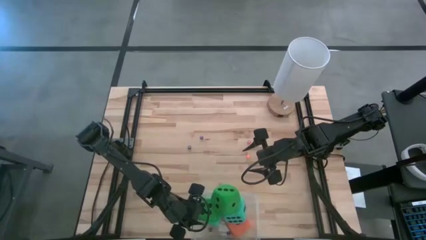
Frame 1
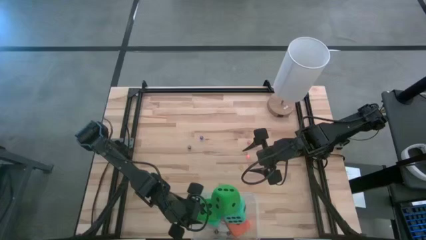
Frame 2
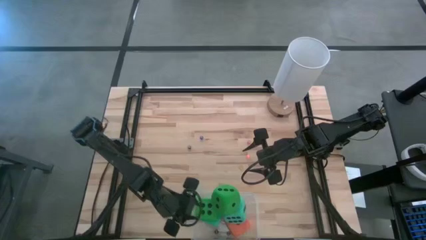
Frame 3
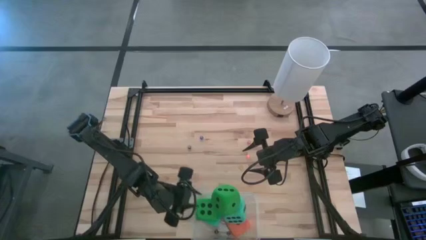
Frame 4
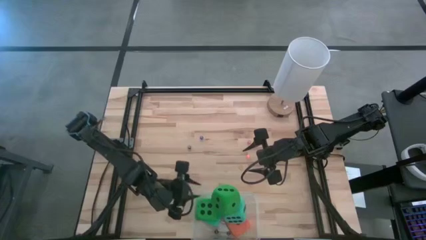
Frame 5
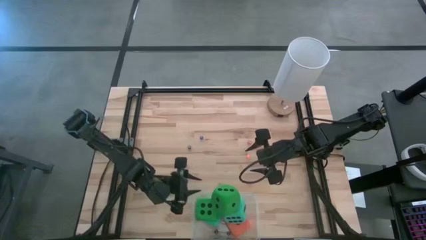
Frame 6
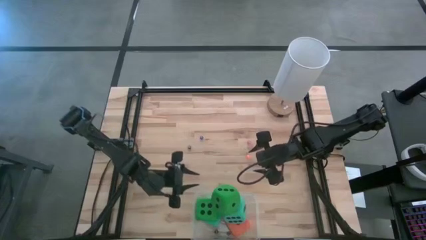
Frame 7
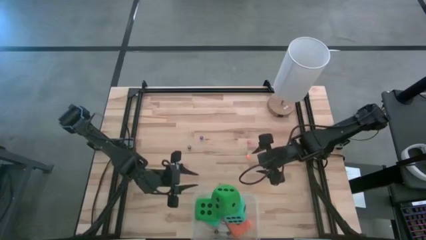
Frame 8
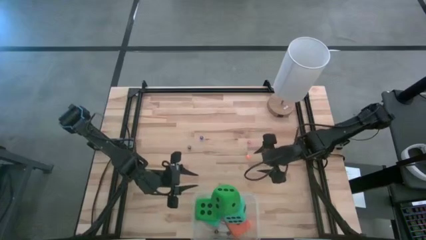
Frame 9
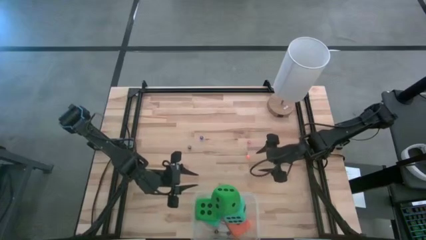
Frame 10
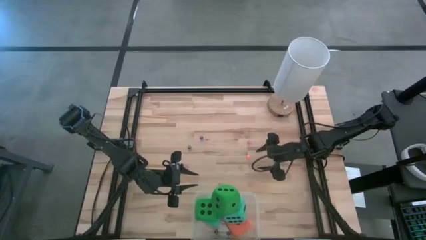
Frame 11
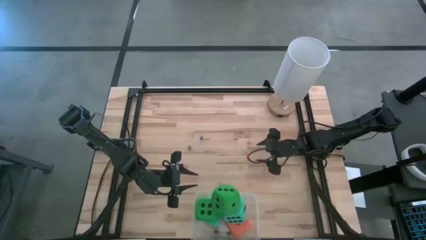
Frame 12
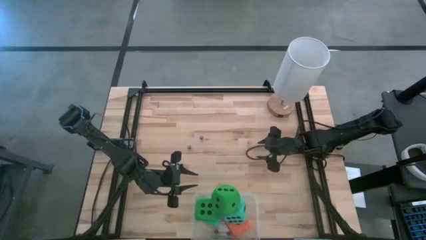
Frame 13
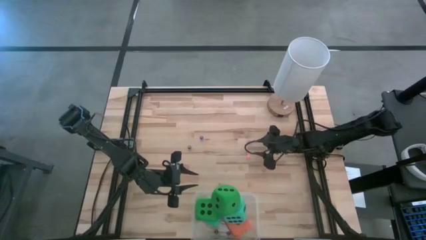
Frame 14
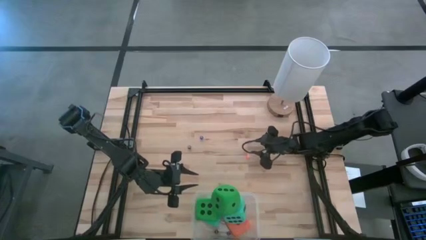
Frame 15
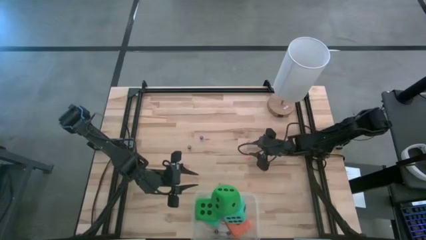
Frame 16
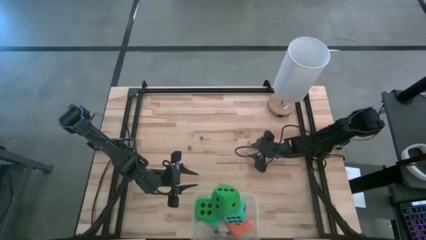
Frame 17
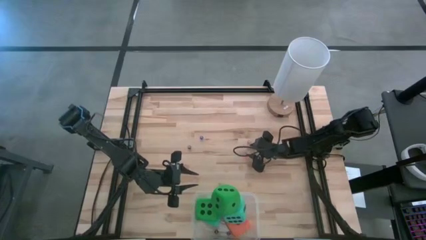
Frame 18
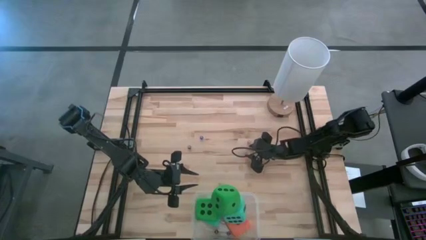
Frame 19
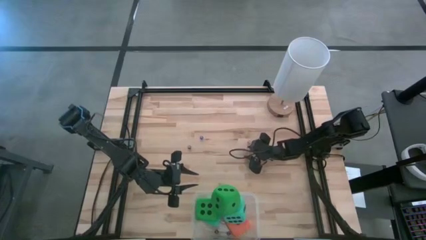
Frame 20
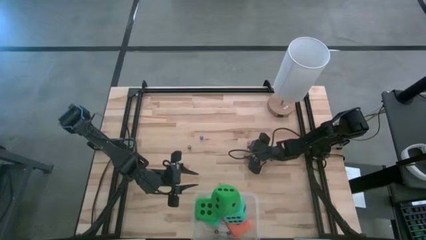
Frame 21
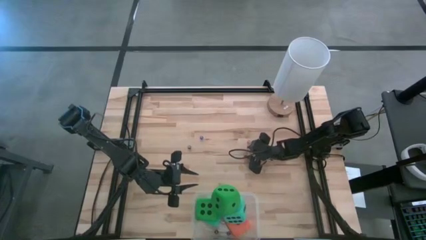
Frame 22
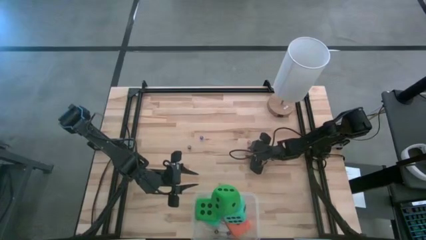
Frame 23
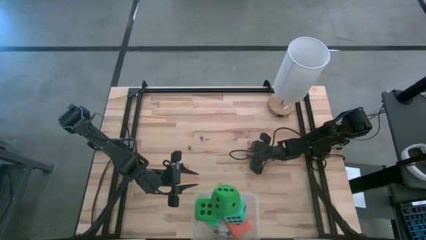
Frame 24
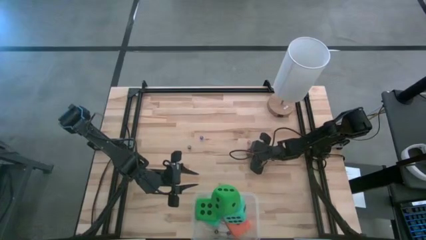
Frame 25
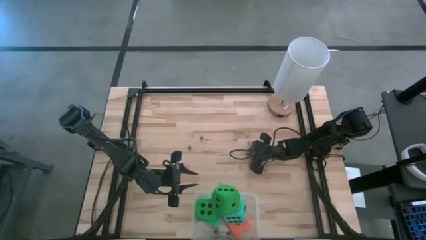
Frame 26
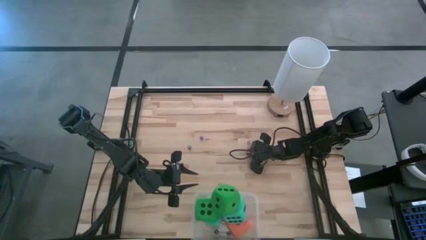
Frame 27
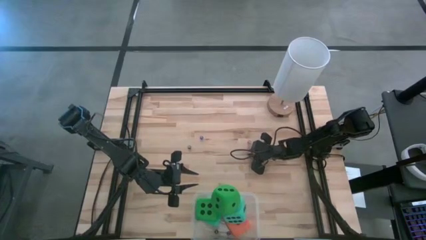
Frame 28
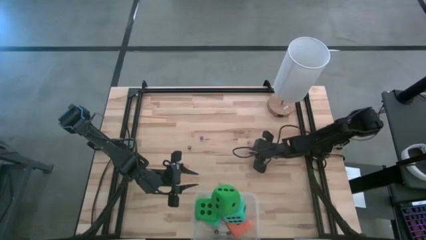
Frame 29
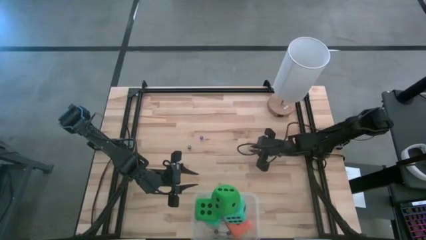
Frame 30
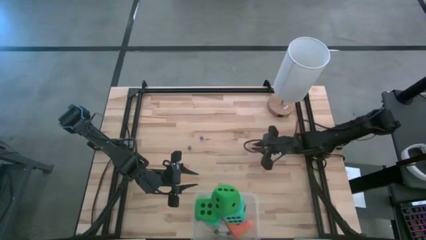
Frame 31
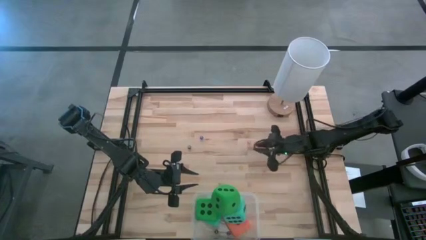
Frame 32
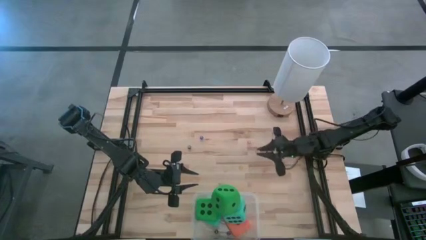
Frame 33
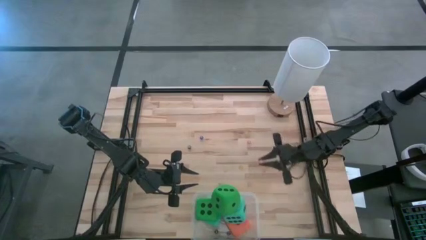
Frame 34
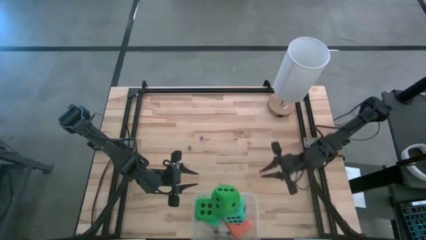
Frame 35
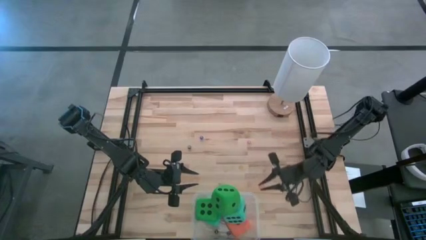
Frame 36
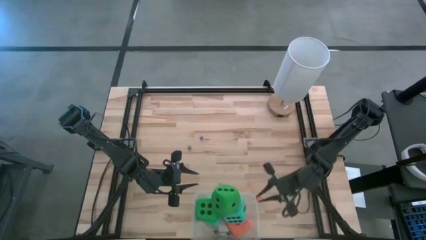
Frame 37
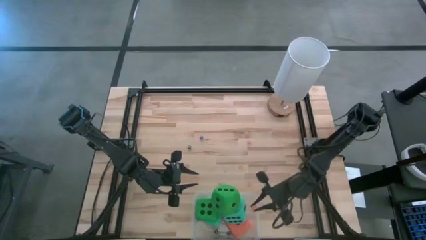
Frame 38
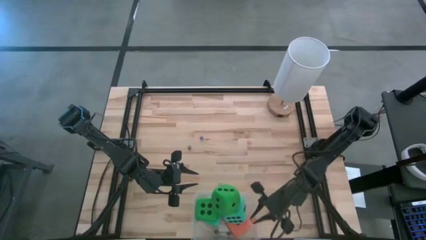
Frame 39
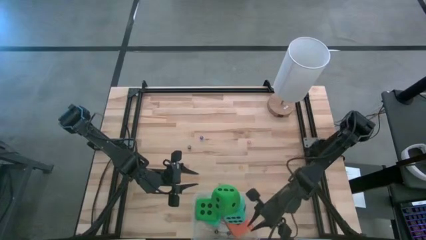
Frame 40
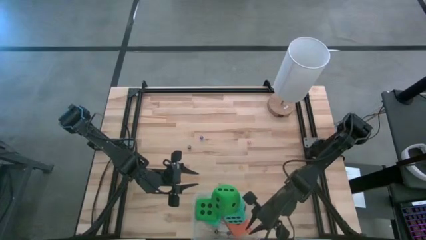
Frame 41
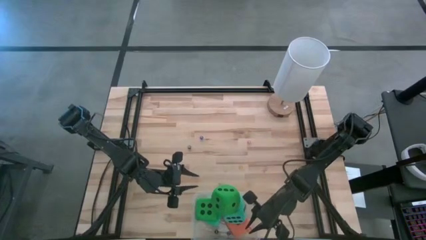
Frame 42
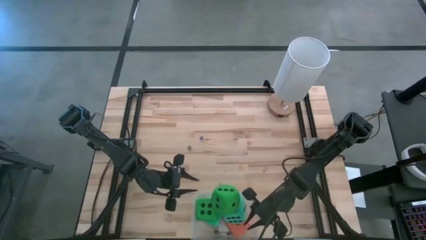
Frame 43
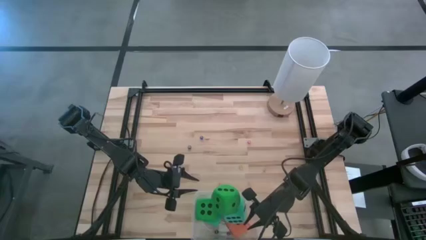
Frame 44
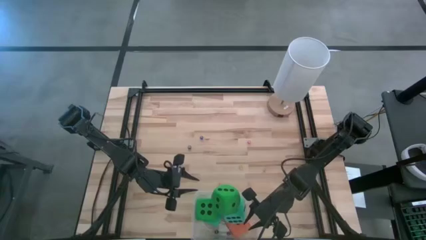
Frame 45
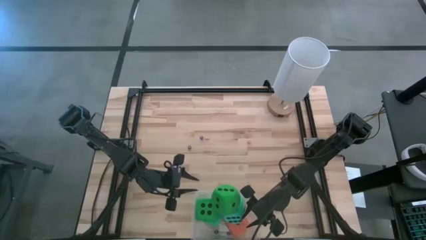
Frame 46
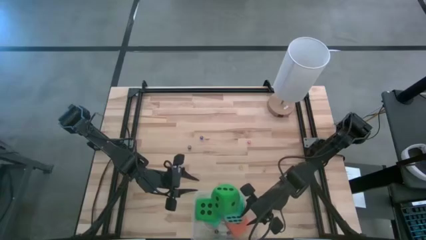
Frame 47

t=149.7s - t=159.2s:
Task: Pick & Place Dice
Put the small orange dice into the transparent bin

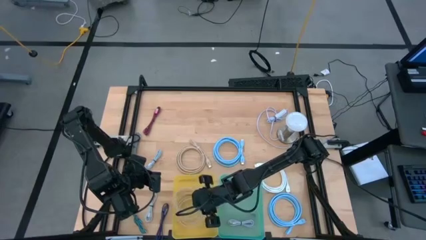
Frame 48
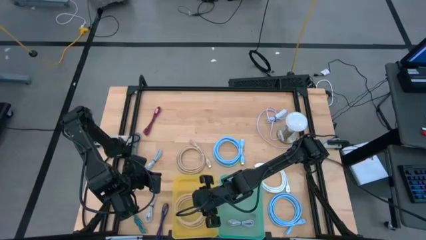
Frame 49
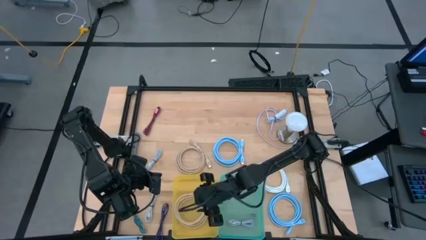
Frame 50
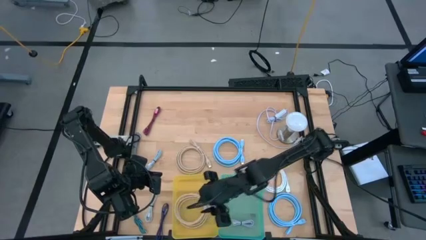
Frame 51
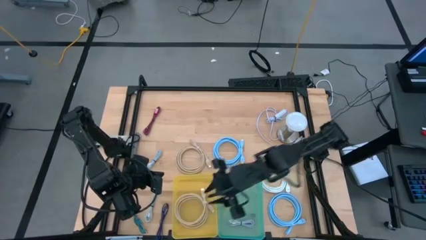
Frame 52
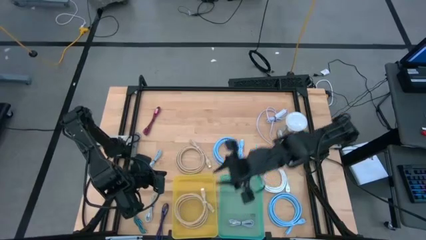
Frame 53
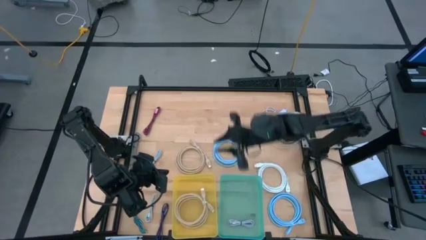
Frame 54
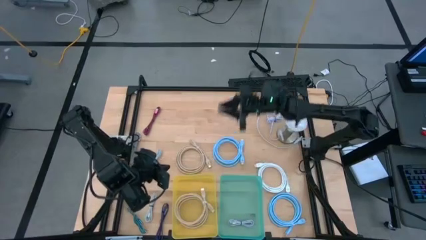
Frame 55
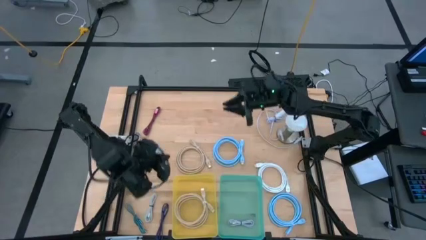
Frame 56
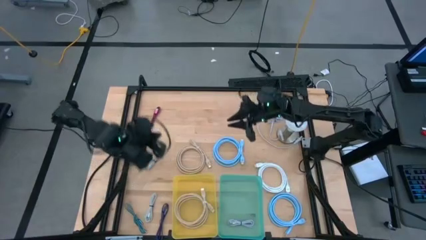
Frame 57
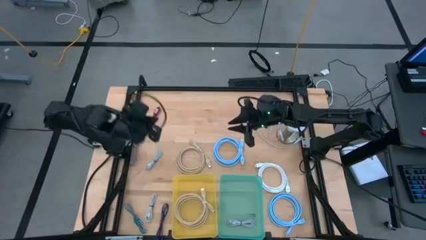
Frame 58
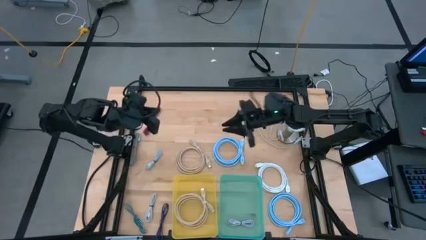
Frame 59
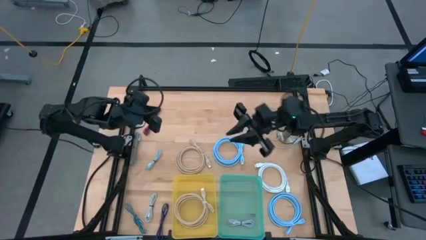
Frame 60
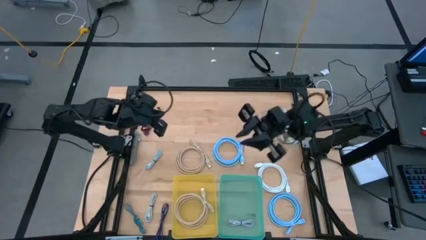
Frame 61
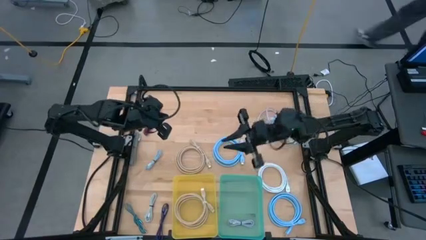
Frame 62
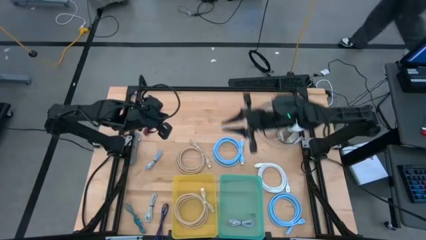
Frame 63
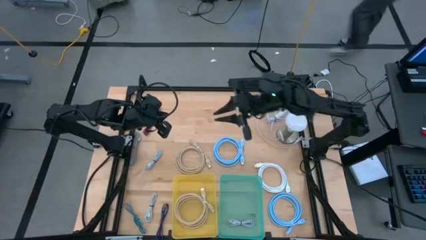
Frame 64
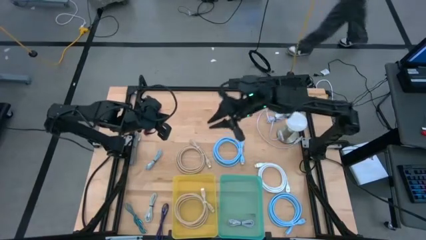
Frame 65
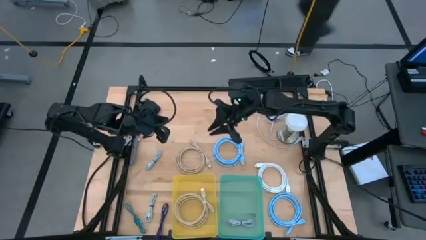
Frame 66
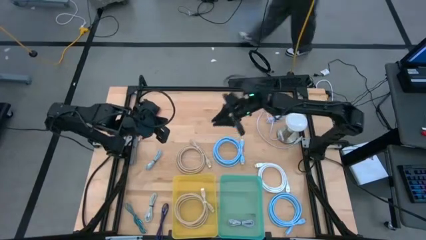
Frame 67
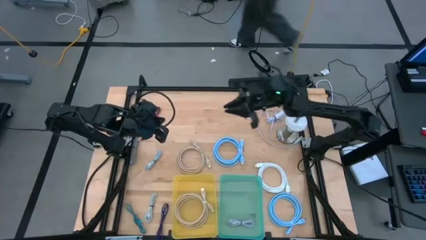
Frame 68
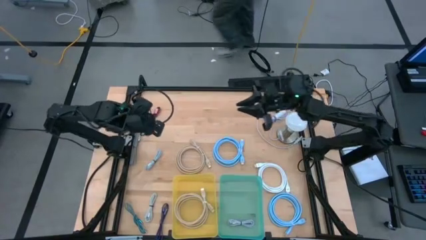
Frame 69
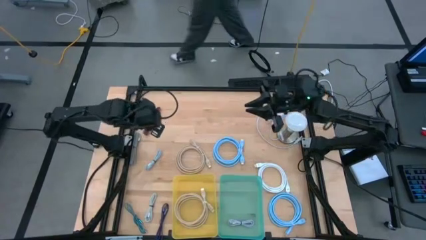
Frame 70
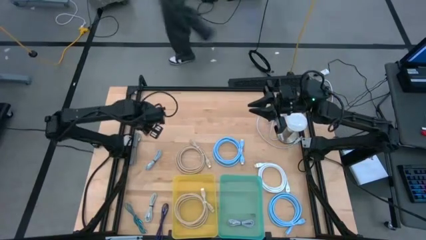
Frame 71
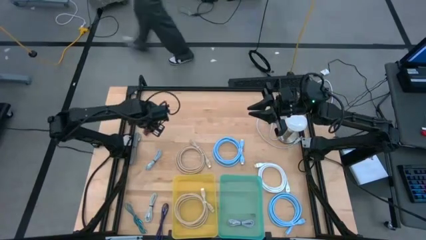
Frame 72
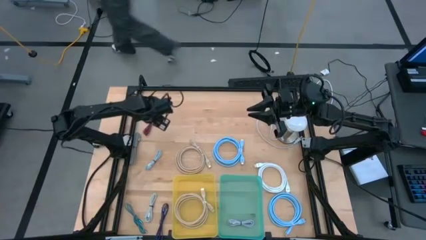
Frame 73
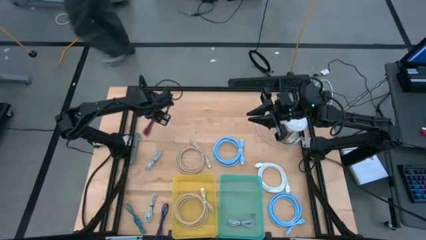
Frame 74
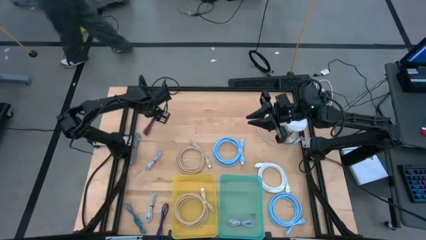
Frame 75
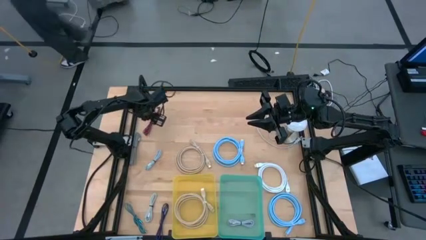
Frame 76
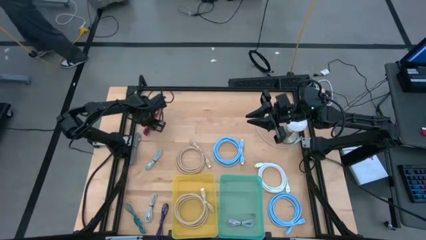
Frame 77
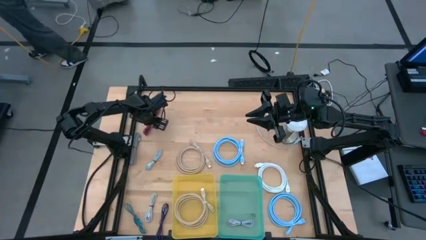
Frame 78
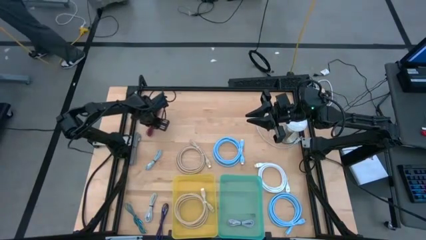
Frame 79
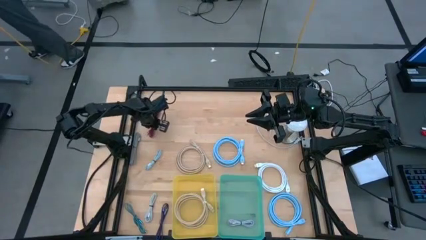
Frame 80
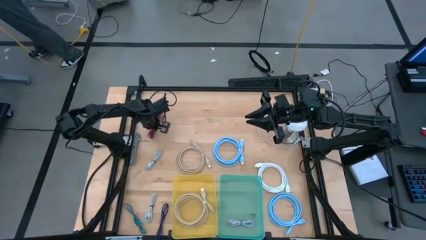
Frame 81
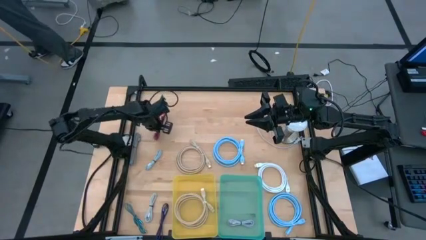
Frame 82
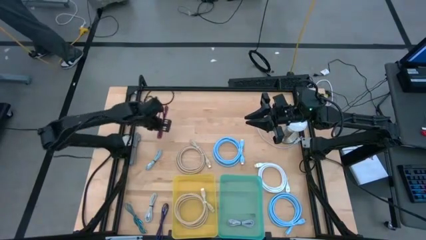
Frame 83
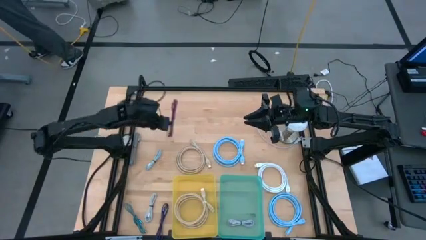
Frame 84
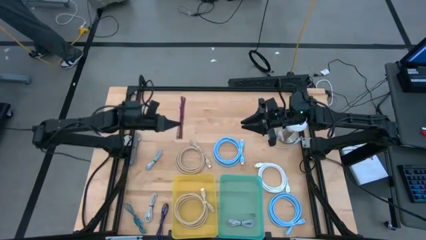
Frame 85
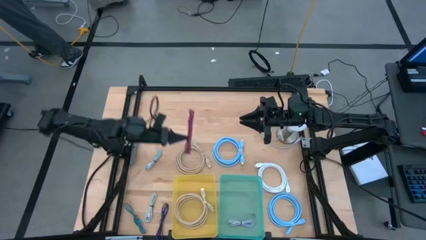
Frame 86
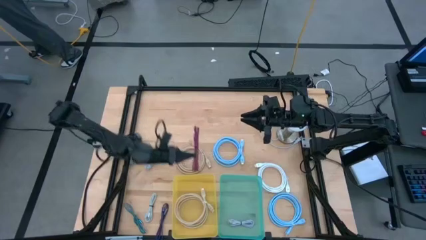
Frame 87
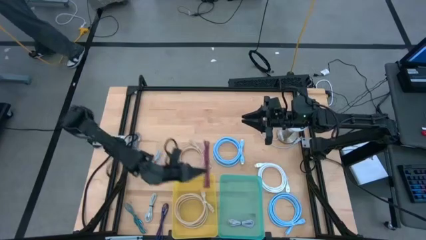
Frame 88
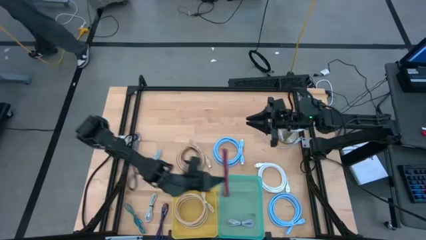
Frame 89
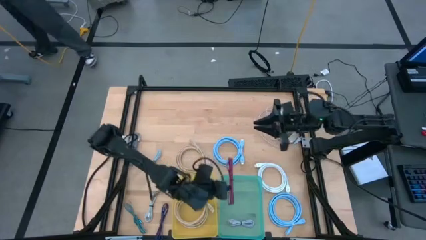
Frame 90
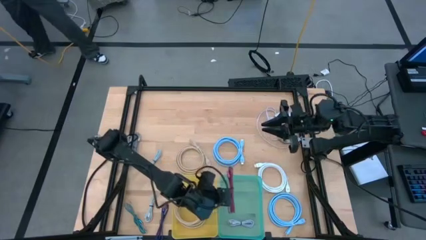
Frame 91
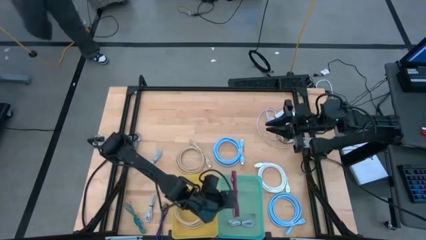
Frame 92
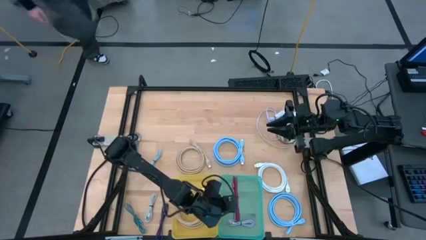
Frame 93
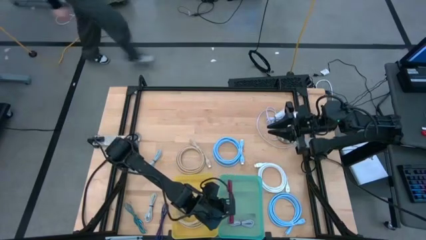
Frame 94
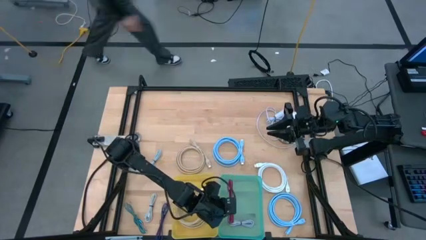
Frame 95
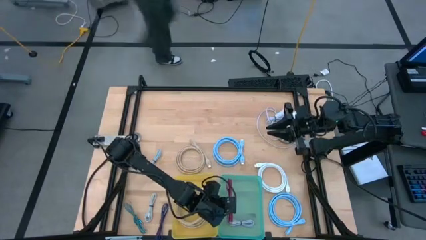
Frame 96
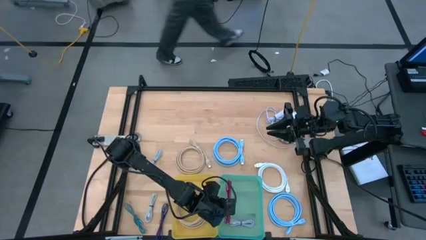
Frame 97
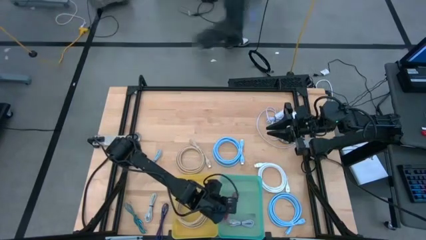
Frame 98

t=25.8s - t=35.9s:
Task: Pick & Place USB Port
Put the small pink striped charger cable into the green bin
